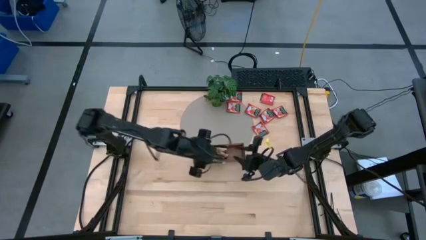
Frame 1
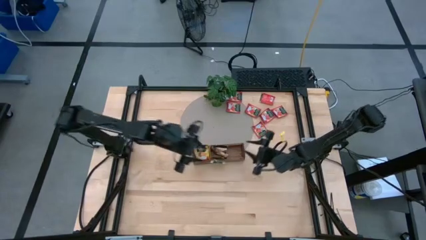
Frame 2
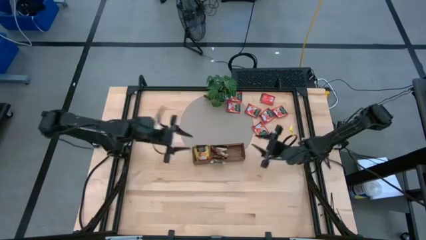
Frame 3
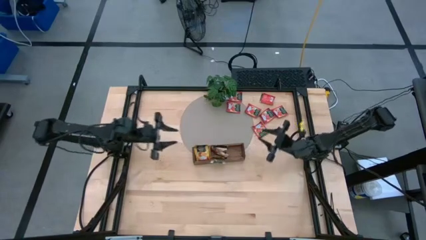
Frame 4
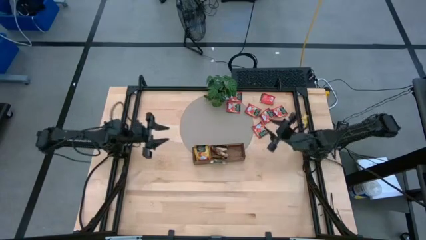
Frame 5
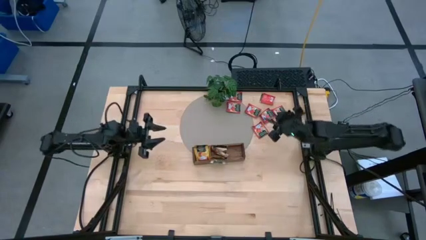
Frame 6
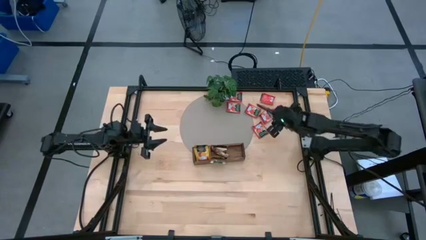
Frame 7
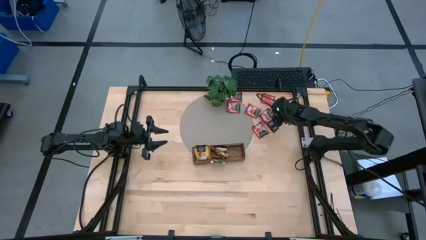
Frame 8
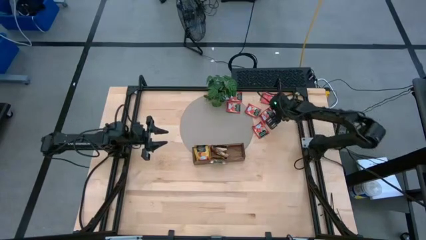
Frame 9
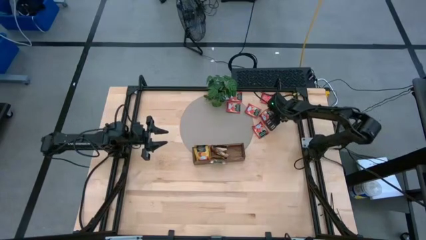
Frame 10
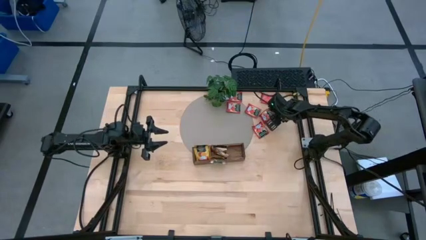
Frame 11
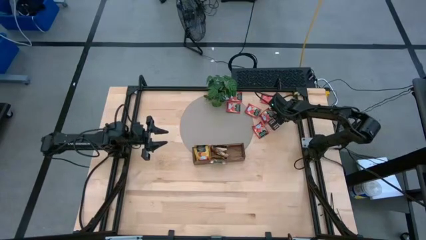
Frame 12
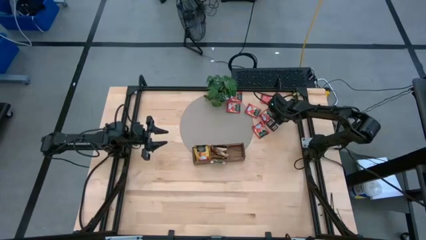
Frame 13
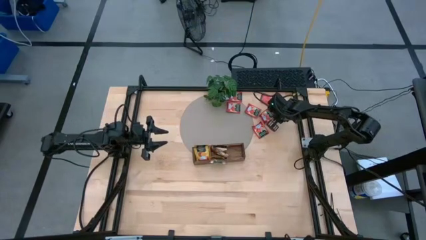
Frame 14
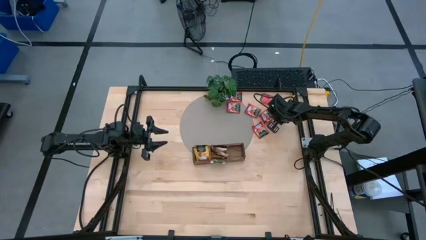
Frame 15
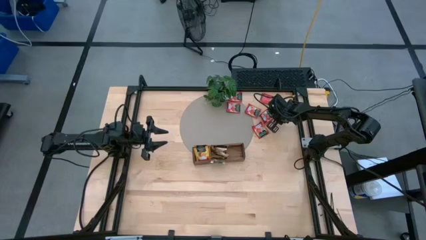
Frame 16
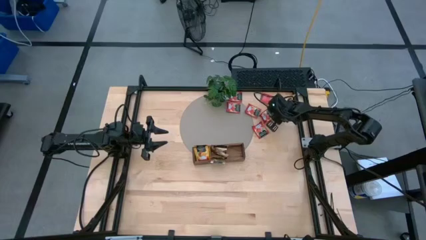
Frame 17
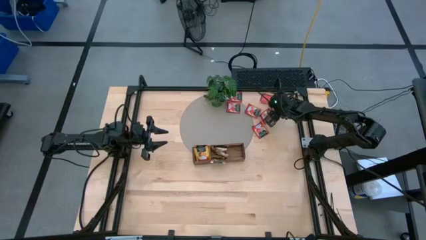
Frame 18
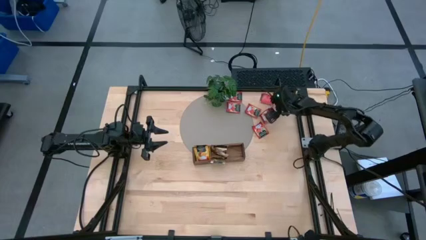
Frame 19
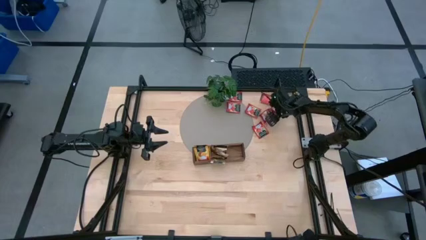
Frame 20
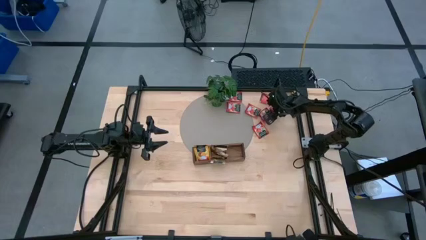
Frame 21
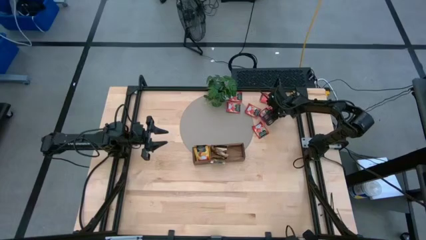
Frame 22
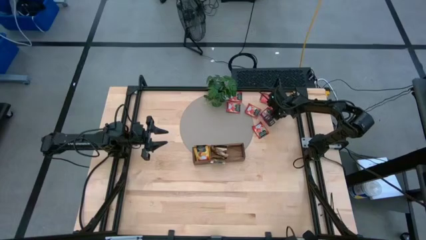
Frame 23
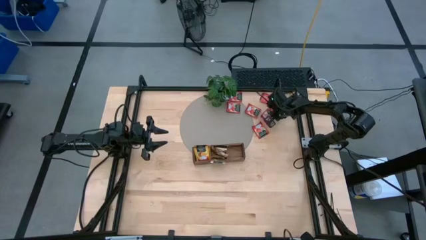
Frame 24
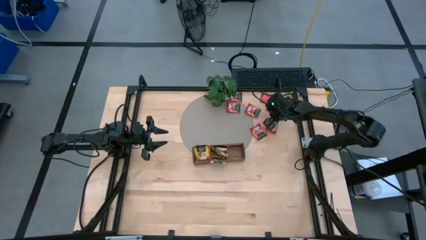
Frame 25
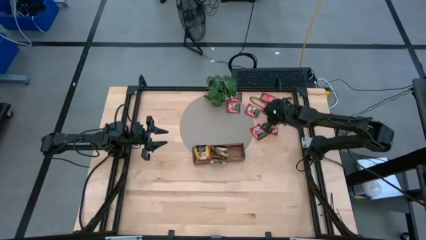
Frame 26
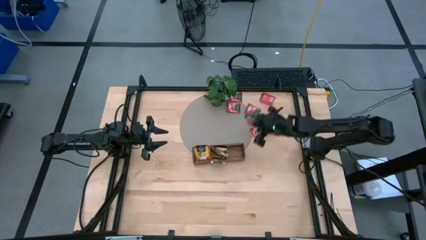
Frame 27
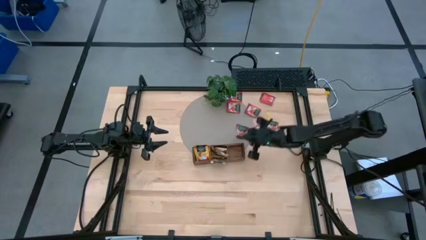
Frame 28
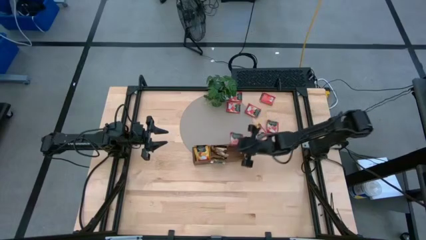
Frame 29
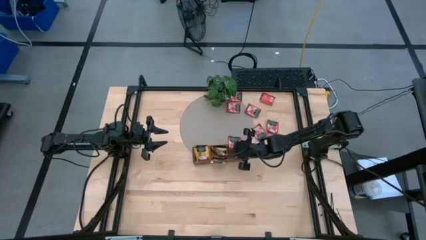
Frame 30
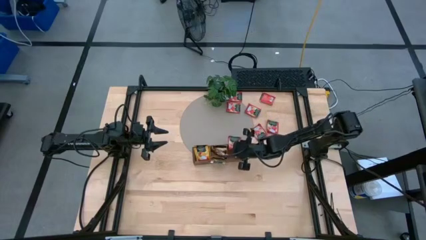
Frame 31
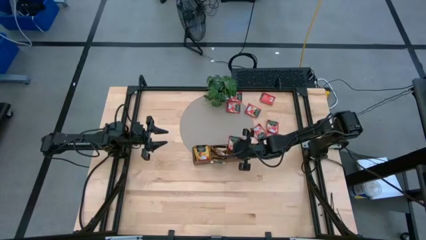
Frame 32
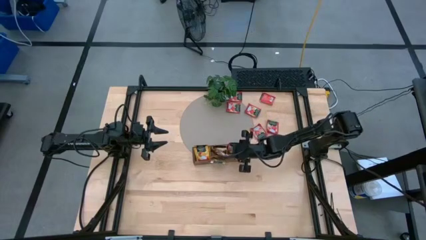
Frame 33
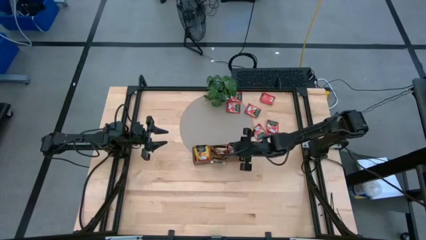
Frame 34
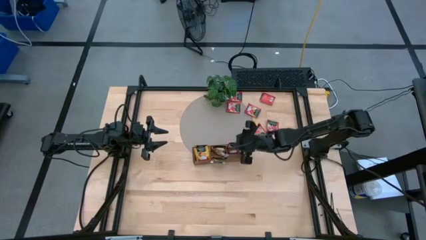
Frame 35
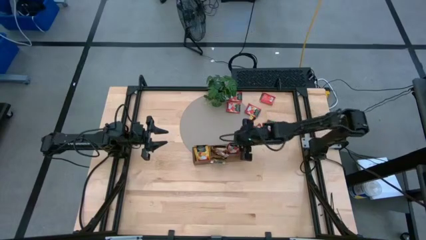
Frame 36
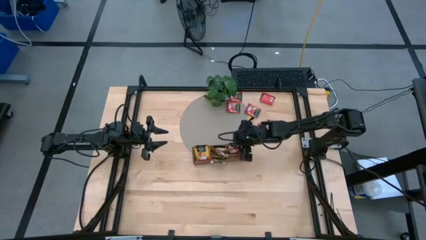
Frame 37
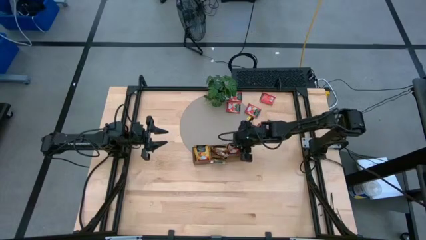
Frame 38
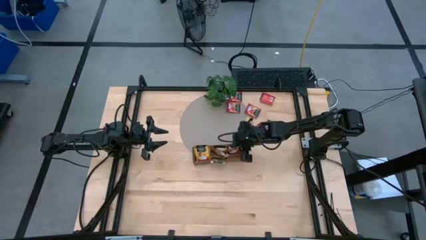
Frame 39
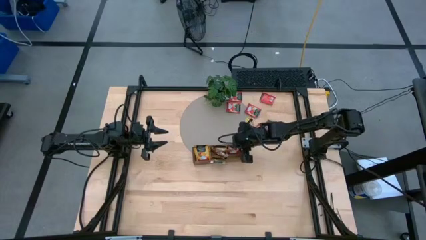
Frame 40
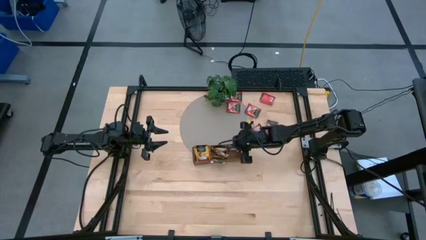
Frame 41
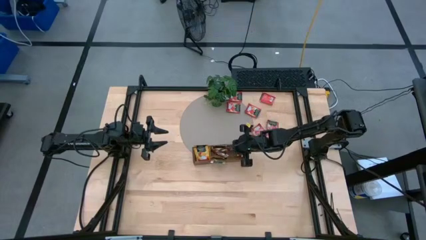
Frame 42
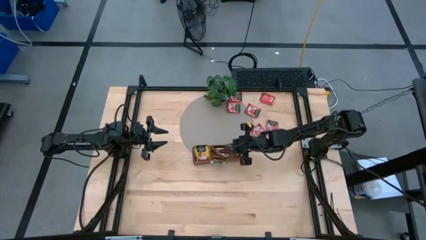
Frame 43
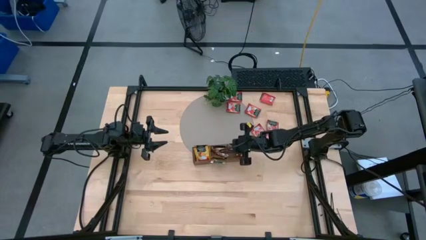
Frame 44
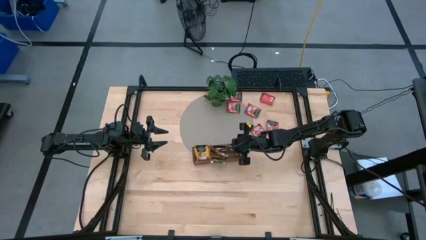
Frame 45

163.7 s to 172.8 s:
Task: Pick & Place Tea
Put the red tea bag into the right slot of the wooden organizer

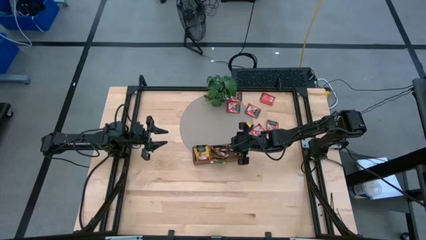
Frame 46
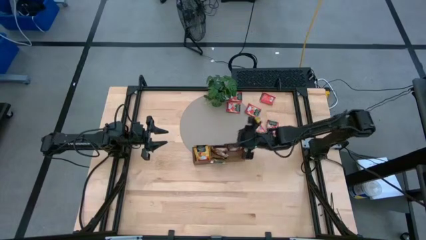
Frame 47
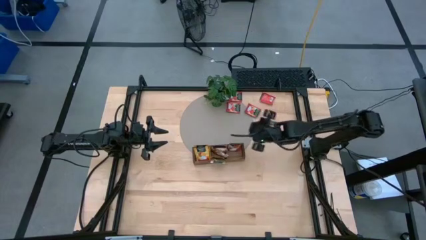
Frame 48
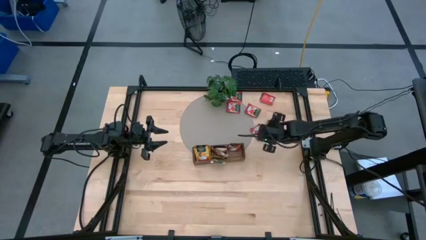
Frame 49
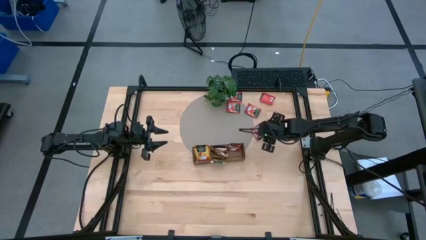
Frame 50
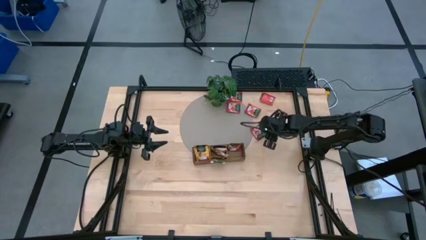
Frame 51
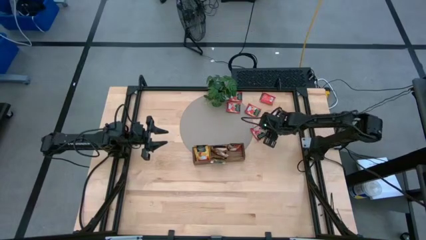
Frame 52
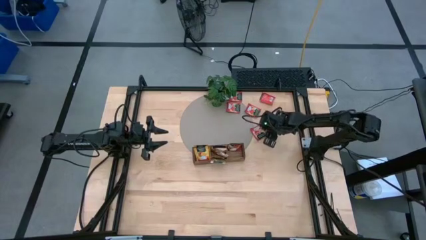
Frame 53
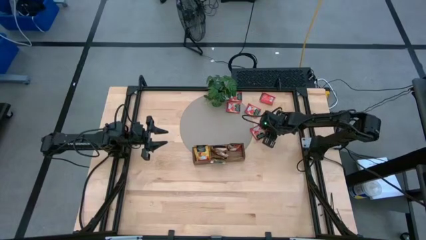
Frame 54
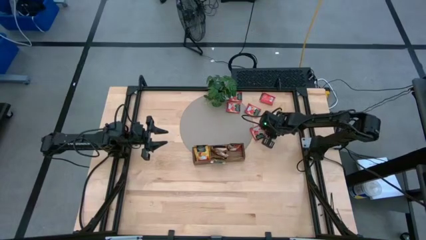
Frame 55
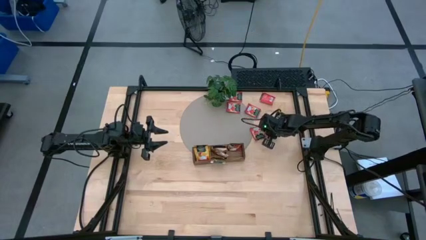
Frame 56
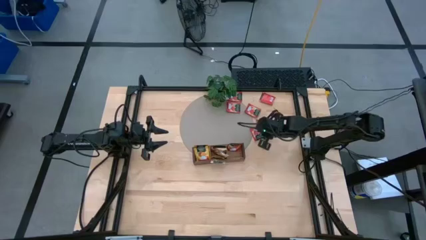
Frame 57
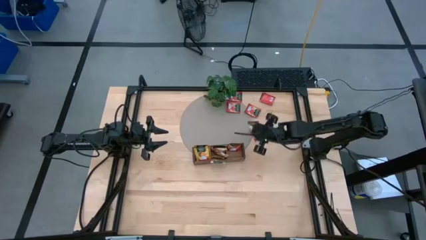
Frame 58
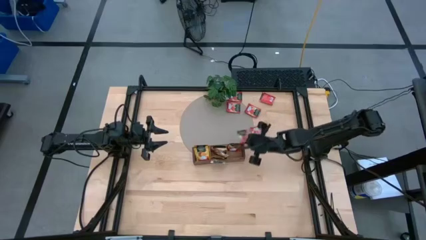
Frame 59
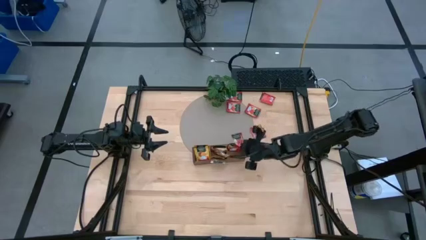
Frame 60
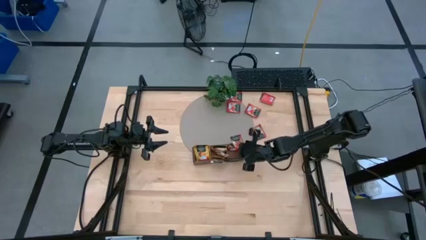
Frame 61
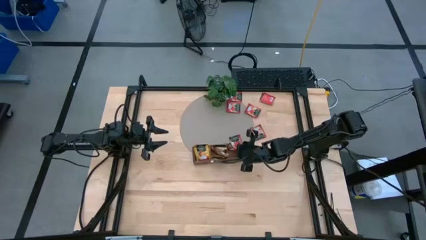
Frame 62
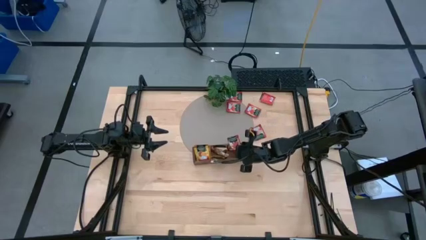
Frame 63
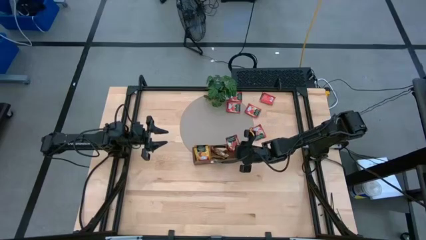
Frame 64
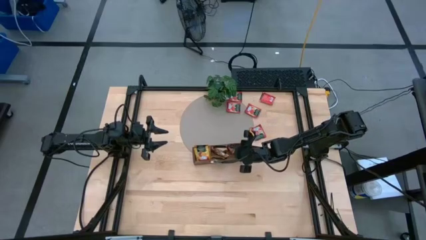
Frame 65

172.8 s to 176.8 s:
Put the red tea bag into the right slot of the wooden organizer
